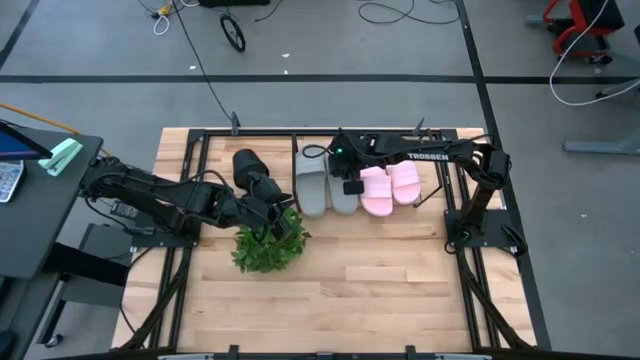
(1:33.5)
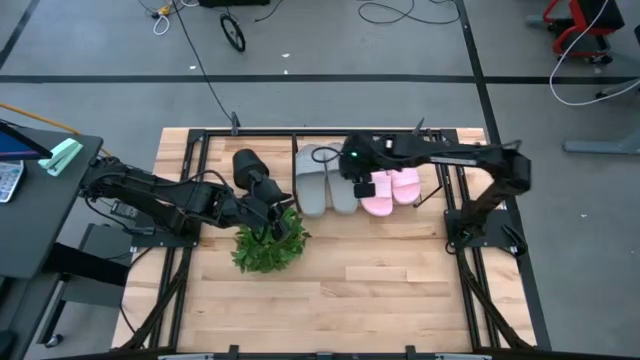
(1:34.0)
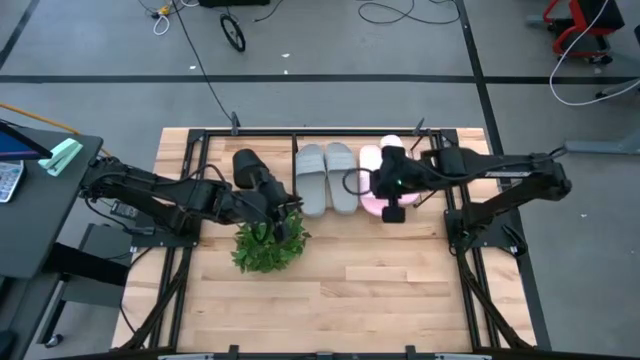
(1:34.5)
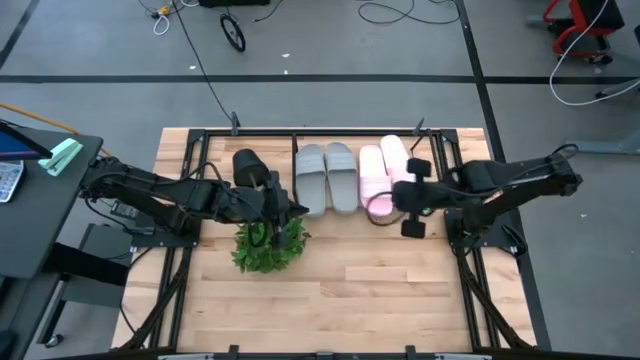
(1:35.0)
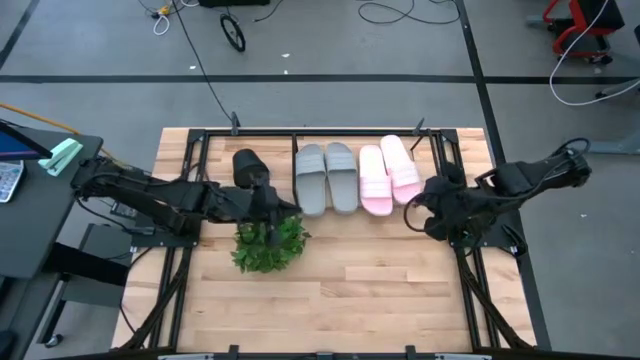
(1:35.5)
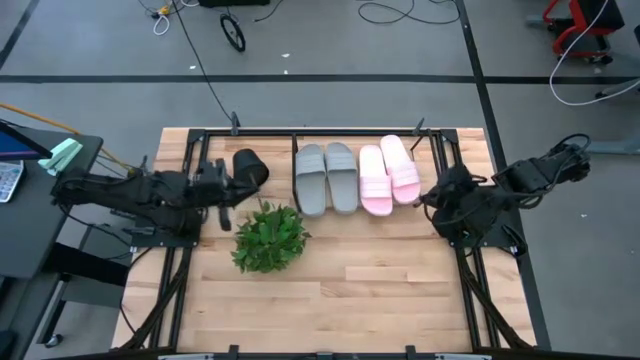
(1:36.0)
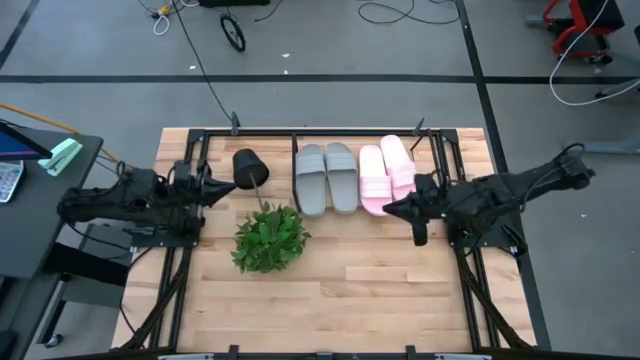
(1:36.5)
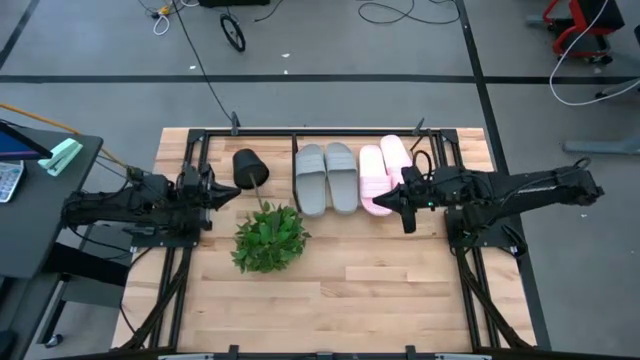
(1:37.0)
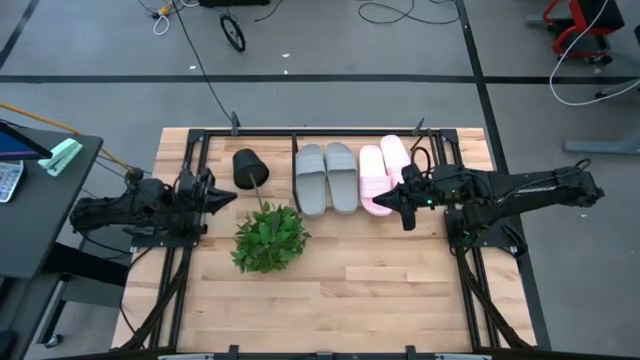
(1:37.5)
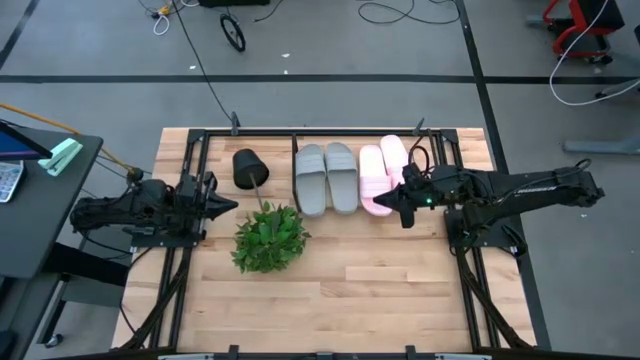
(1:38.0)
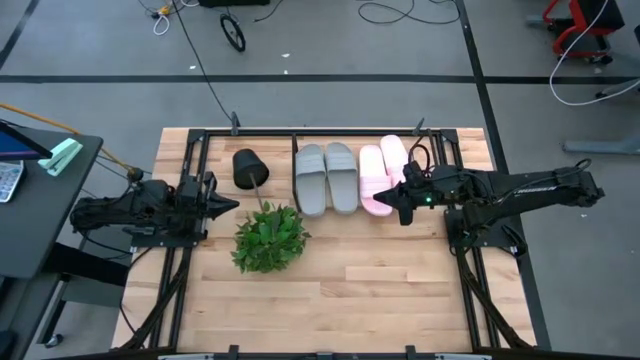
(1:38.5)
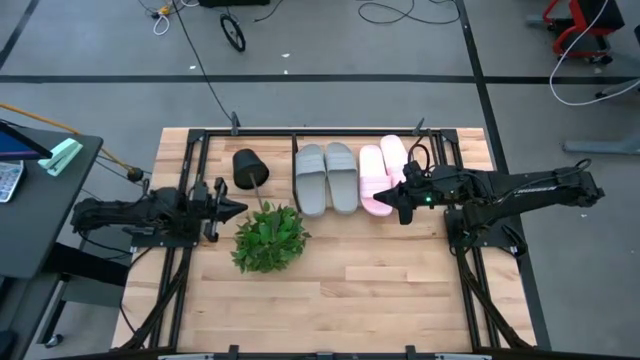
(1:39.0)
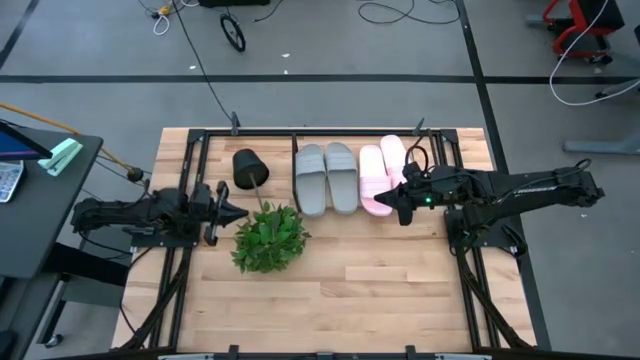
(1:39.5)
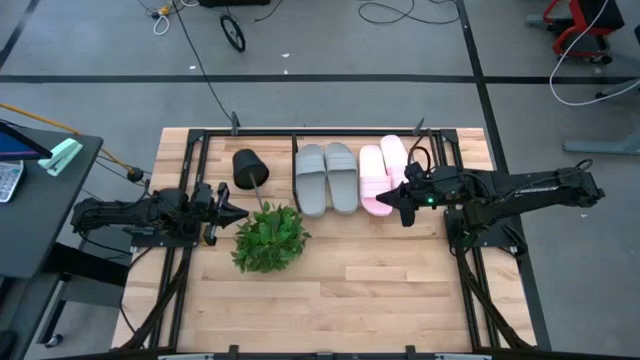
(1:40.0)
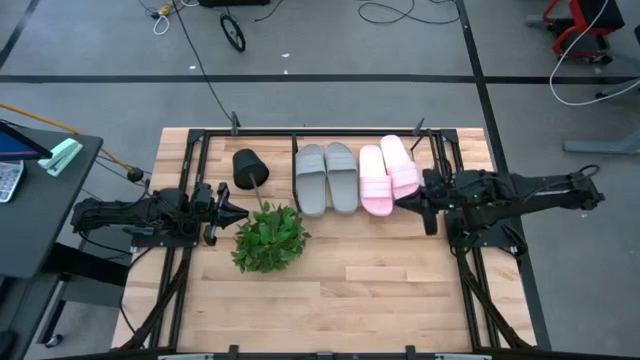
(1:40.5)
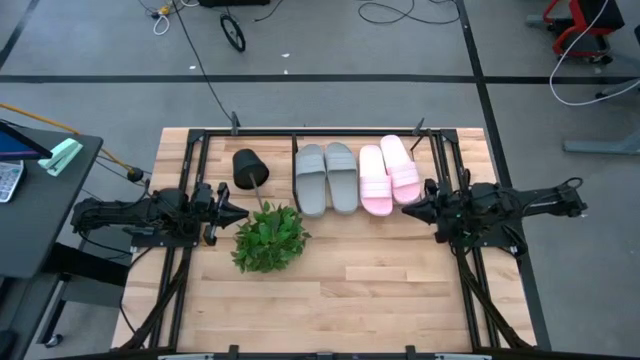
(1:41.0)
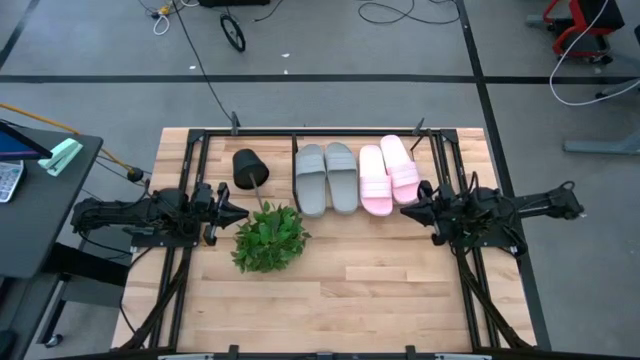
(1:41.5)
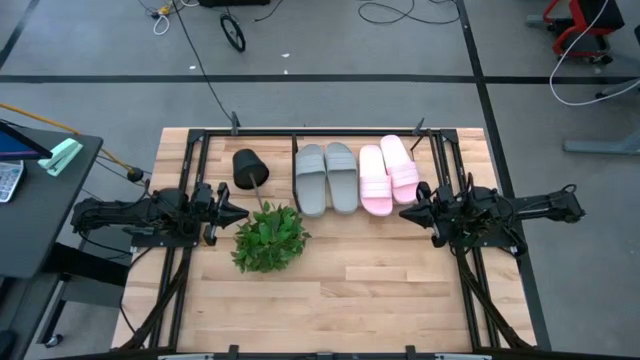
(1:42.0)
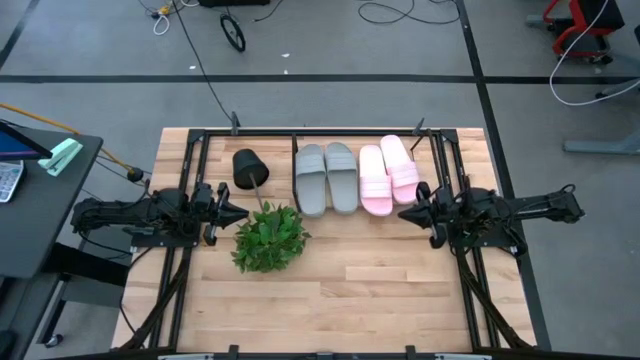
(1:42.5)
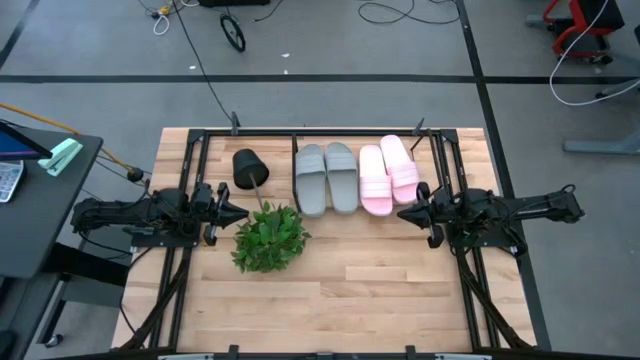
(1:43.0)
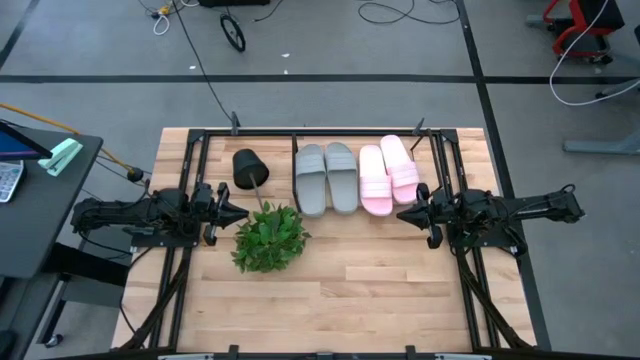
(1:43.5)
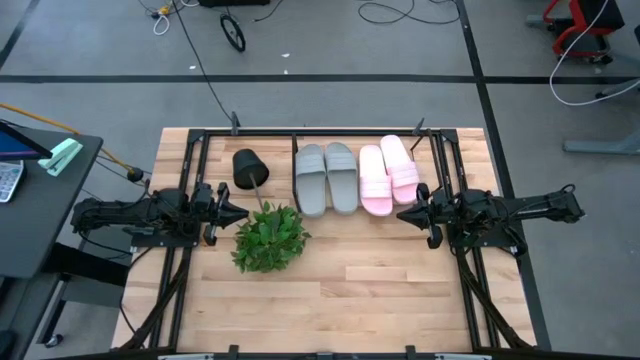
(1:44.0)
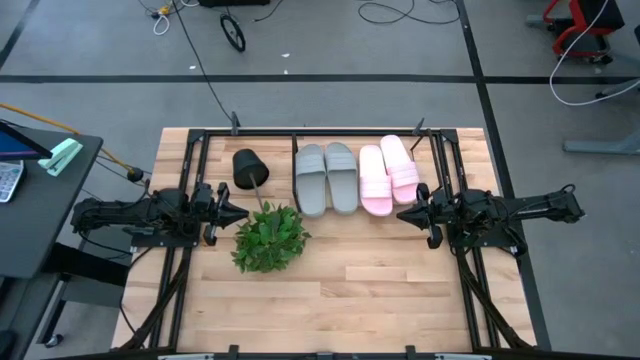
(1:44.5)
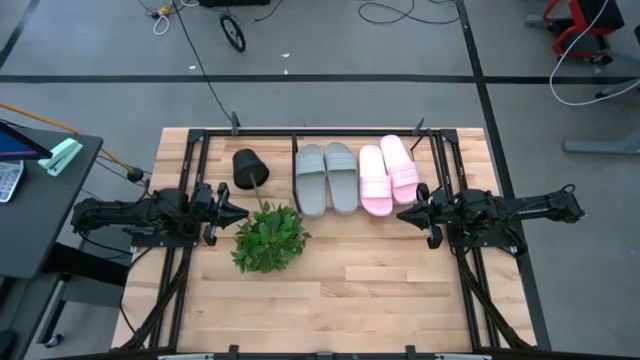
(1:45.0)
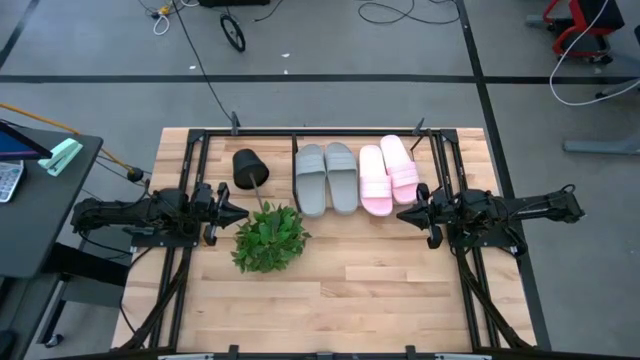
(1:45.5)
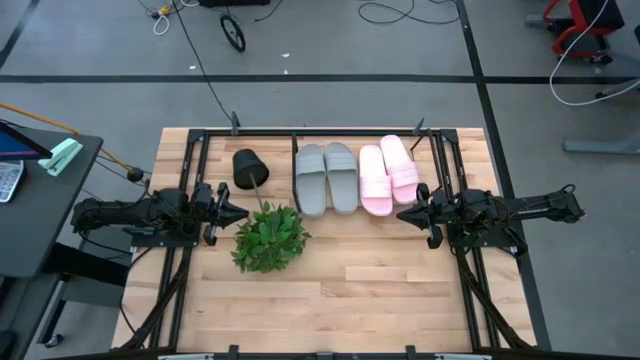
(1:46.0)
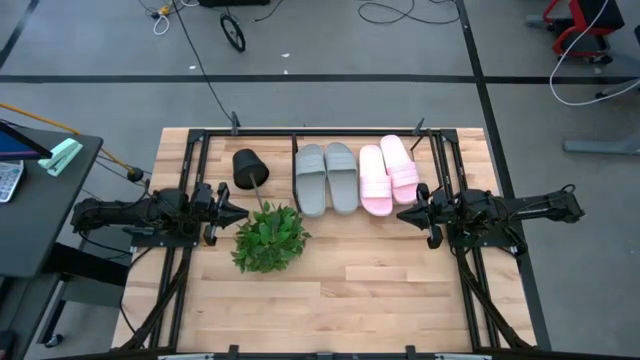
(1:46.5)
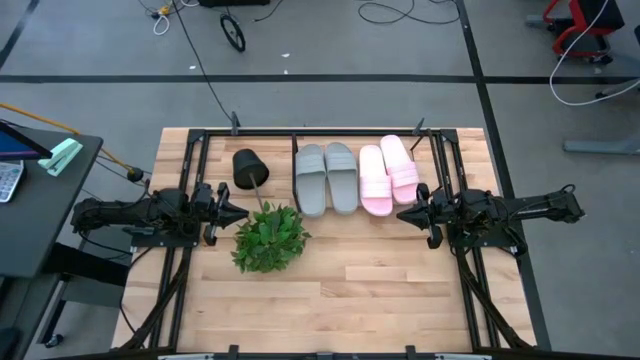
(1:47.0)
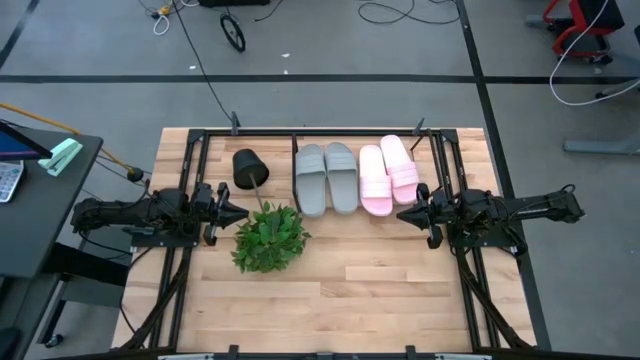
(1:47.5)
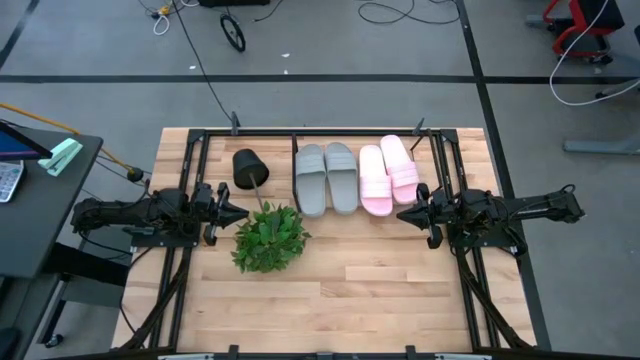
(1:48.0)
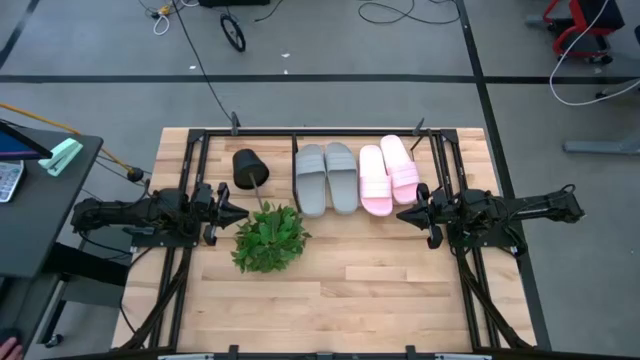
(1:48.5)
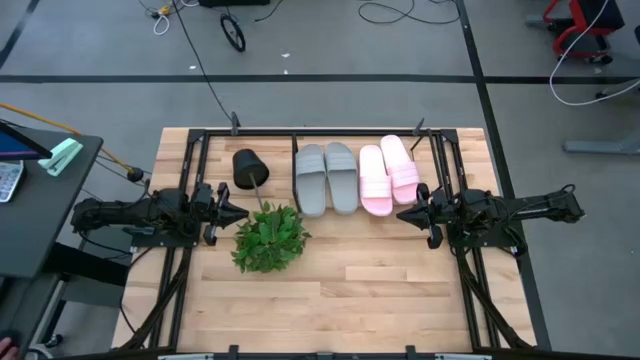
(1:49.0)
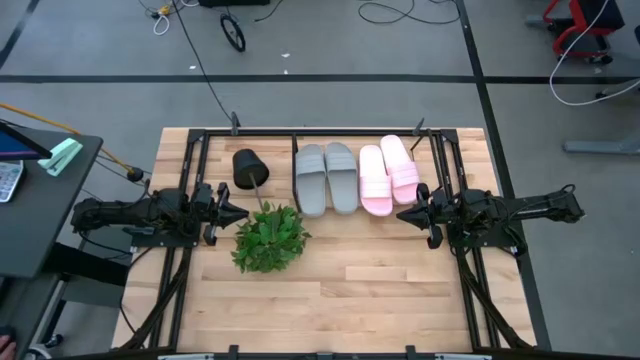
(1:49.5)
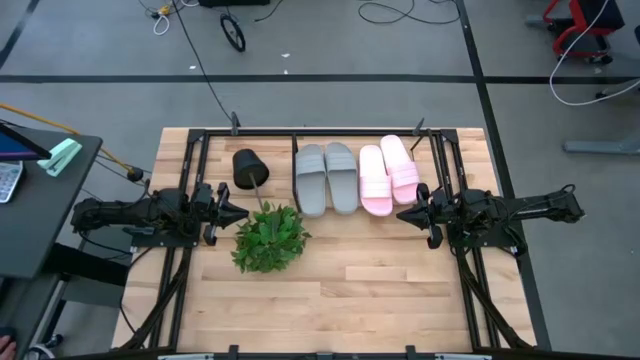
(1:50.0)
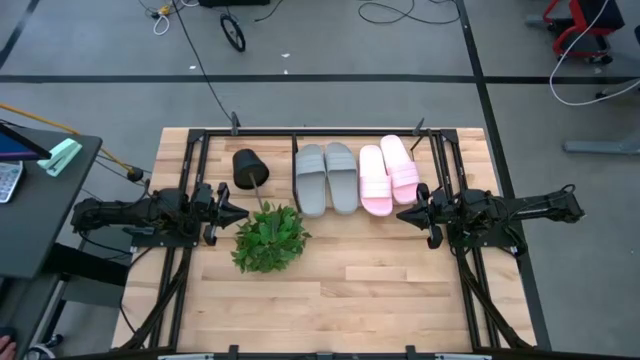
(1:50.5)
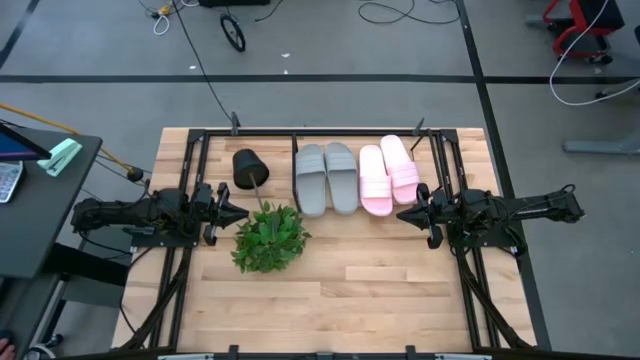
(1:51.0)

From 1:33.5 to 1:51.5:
Task: Pick and place slides into the shelf
Return to Home Position

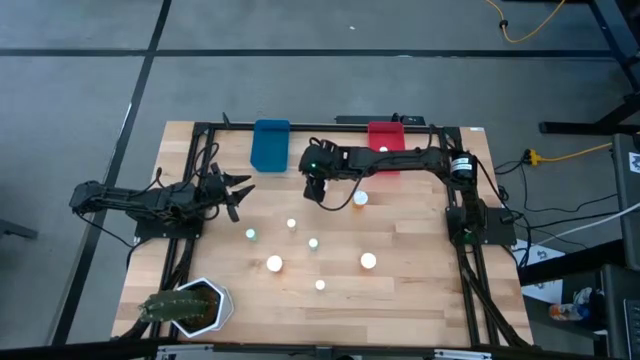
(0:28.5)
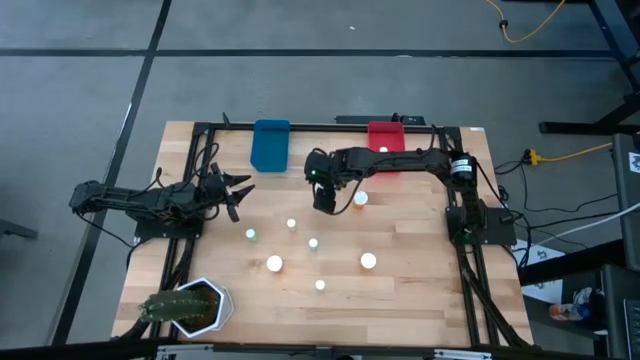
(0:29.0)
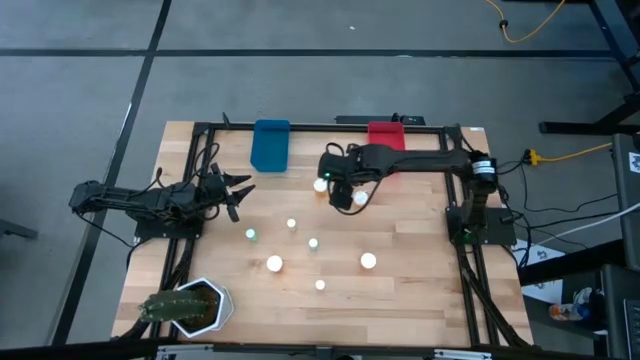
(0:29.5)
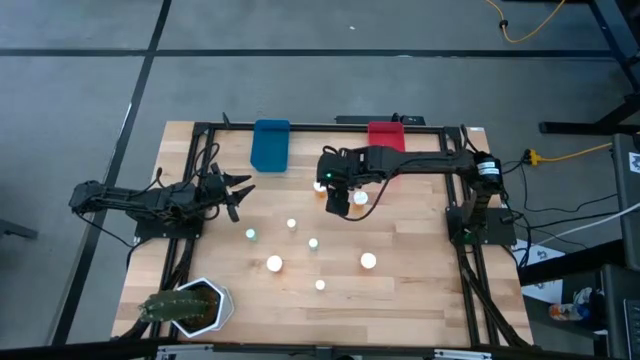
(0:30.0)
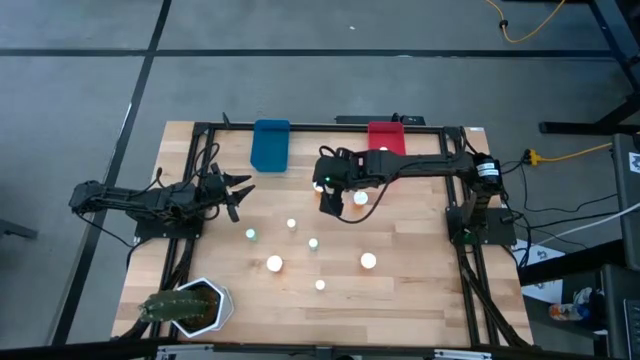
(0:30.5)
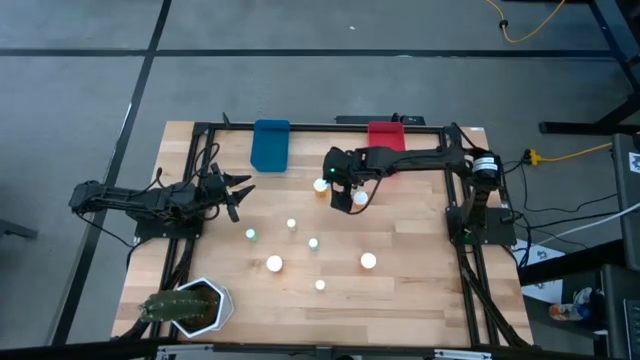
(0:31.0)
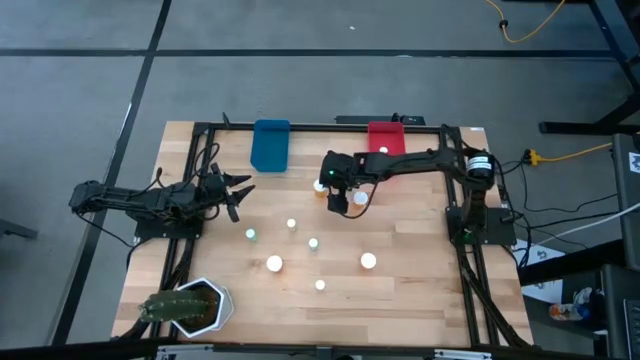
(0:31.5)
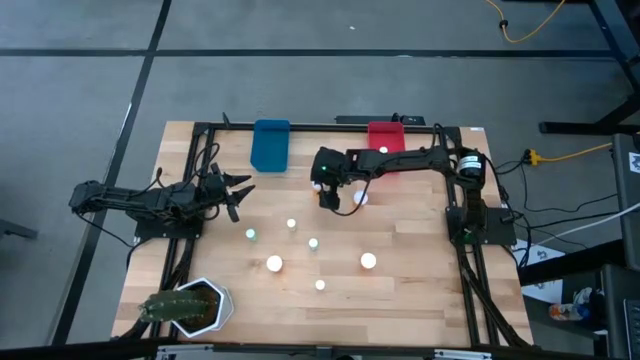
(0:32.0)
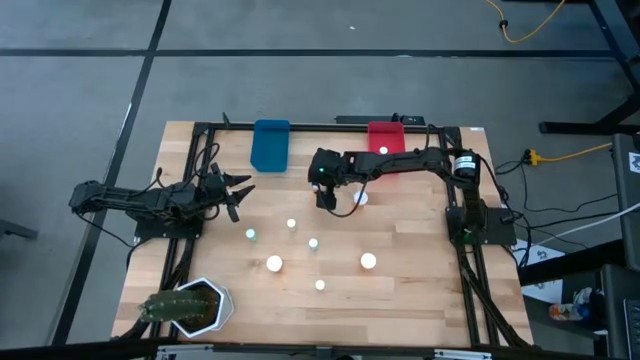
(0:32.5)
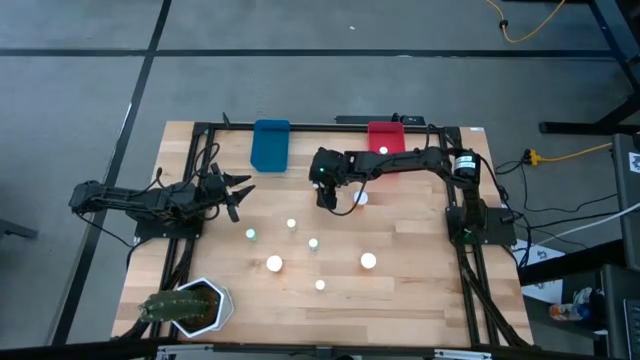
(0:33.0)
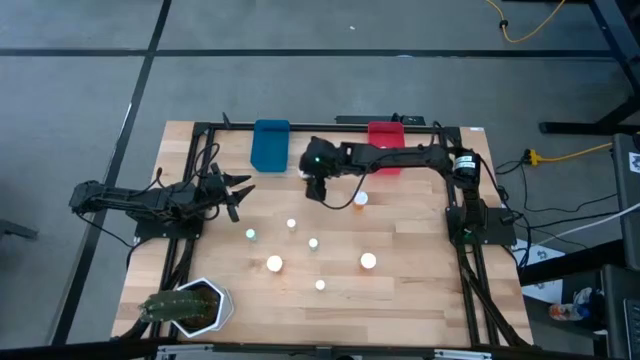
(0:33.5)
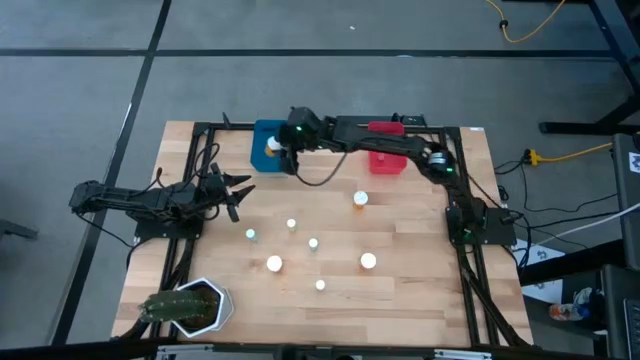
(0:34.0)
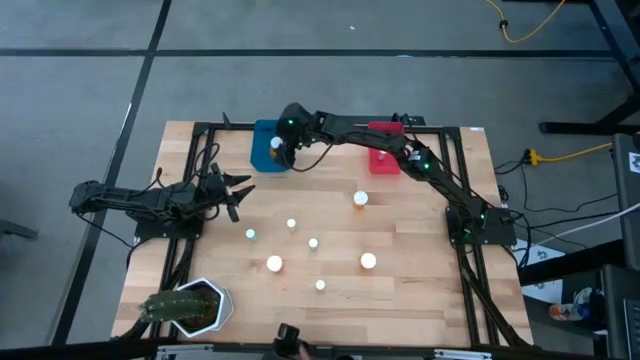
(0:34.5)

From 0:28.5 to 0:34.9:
Task: Pick and place medicine bottles into bin by pill shape (circle, oval)
Put the big orange pill bottle into the blue bin
